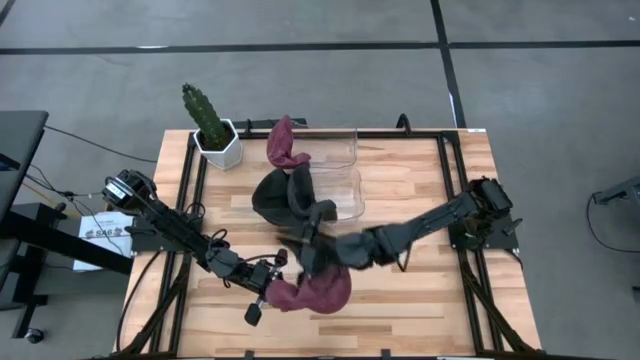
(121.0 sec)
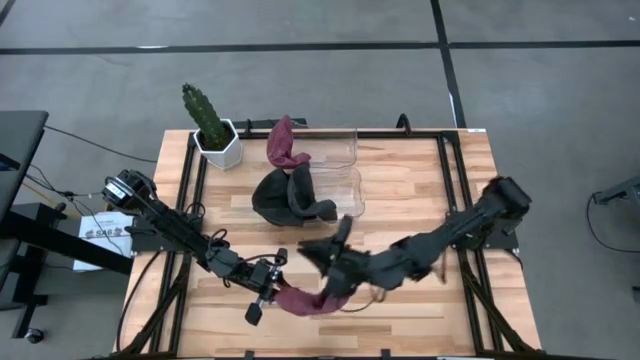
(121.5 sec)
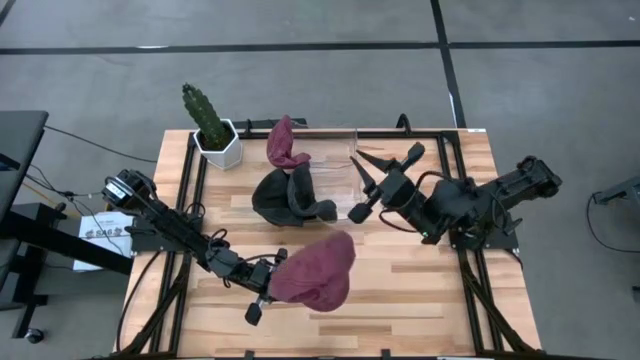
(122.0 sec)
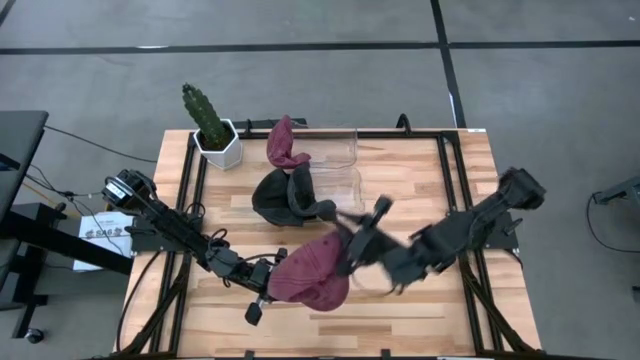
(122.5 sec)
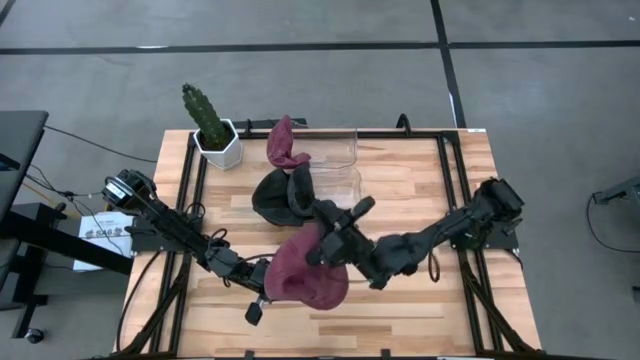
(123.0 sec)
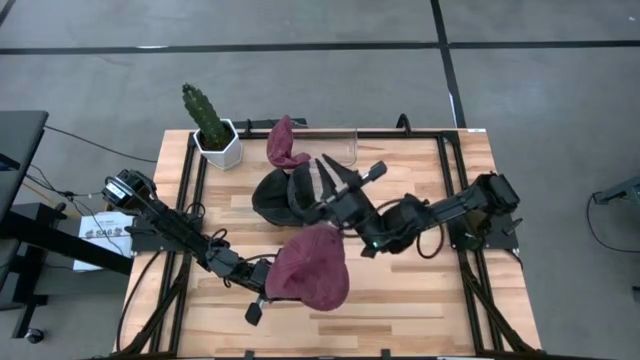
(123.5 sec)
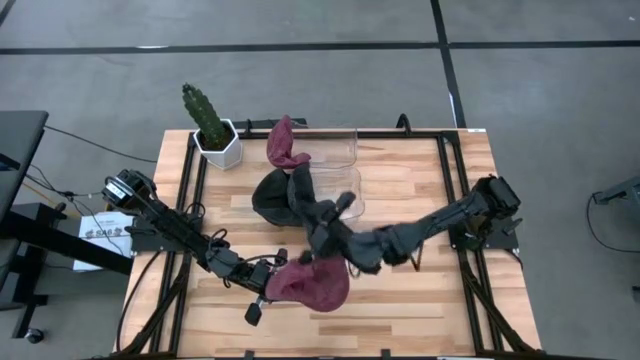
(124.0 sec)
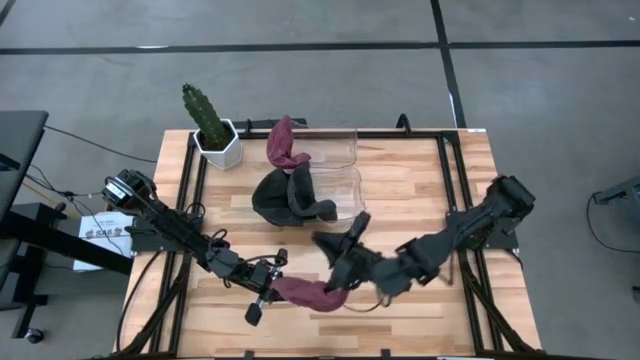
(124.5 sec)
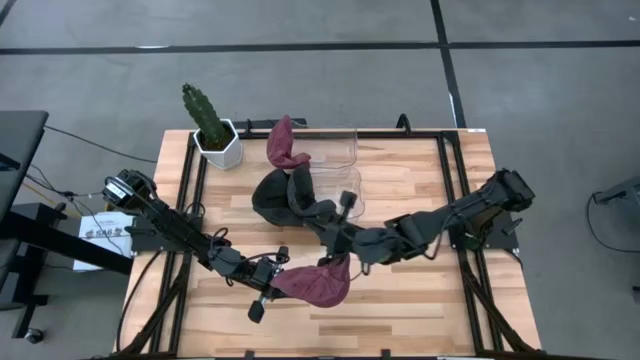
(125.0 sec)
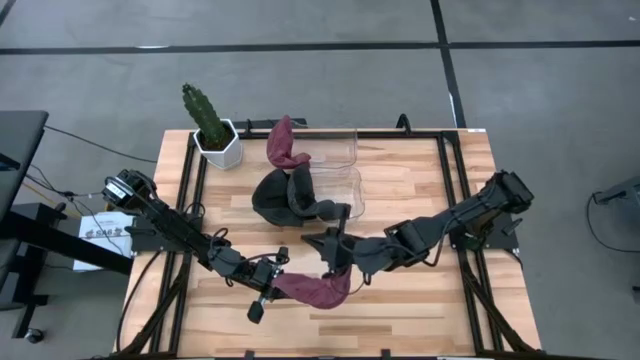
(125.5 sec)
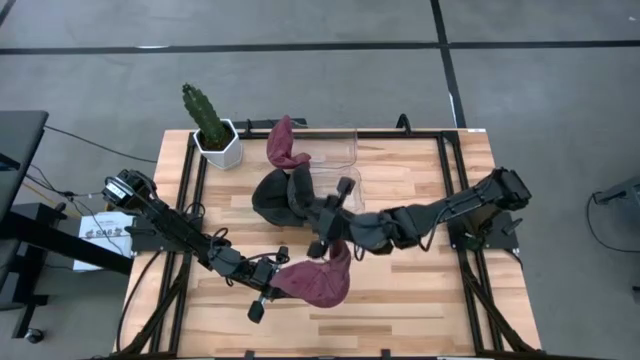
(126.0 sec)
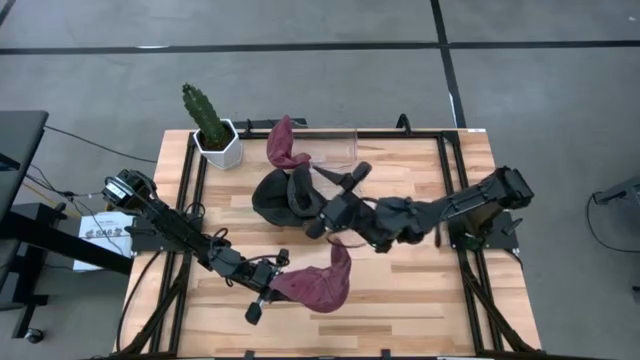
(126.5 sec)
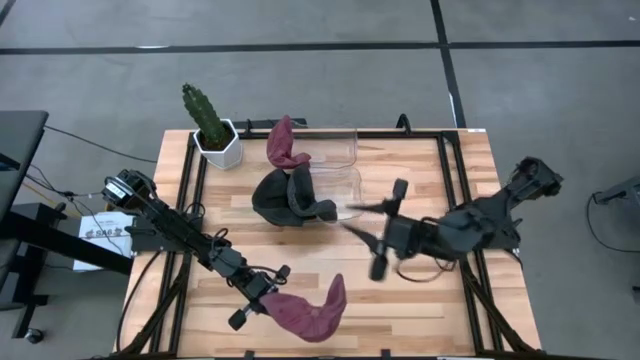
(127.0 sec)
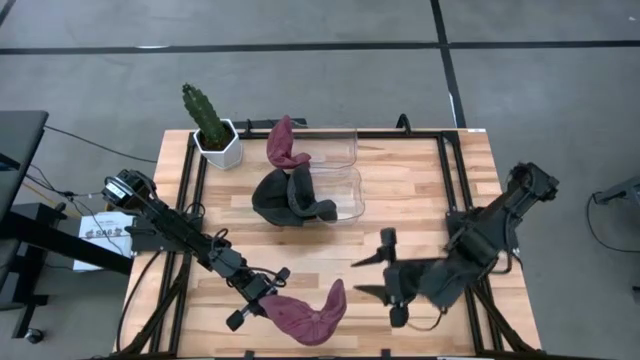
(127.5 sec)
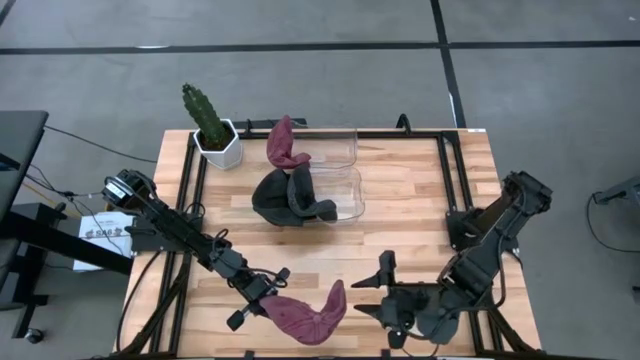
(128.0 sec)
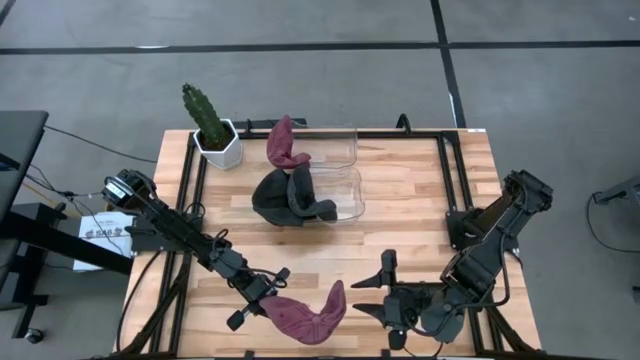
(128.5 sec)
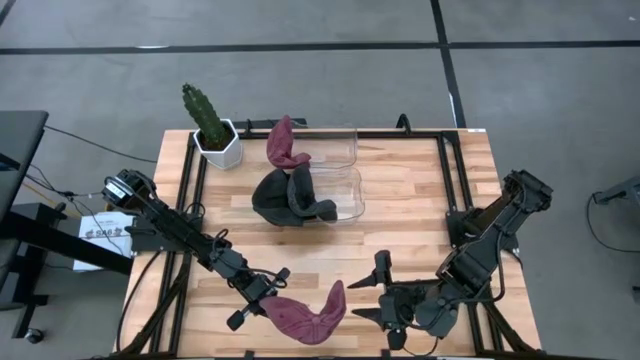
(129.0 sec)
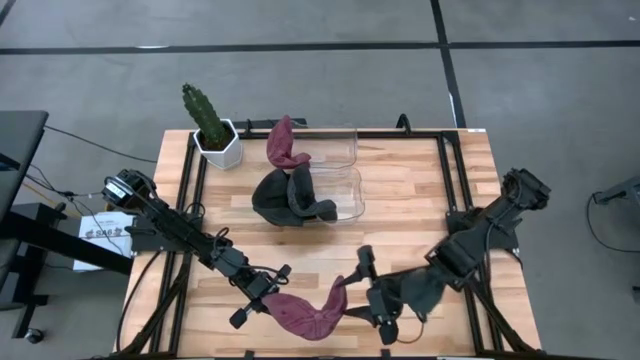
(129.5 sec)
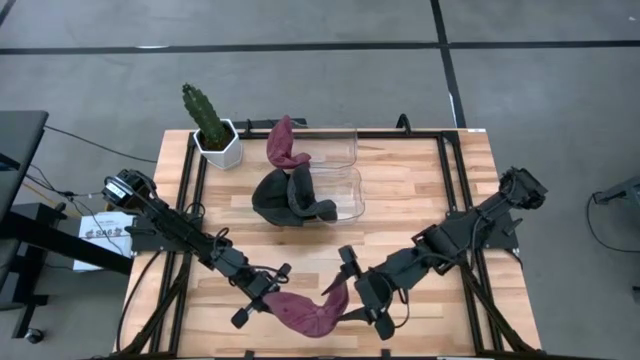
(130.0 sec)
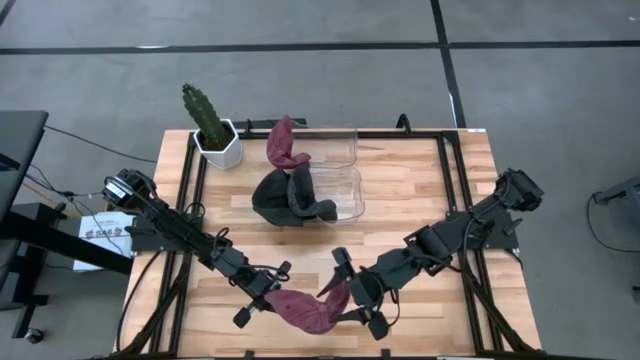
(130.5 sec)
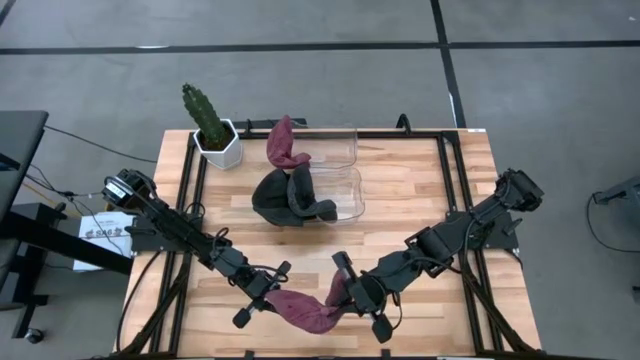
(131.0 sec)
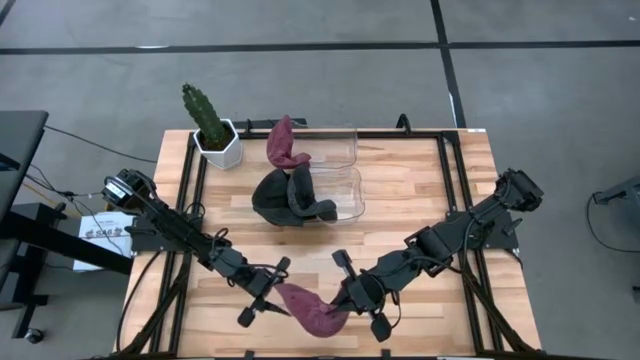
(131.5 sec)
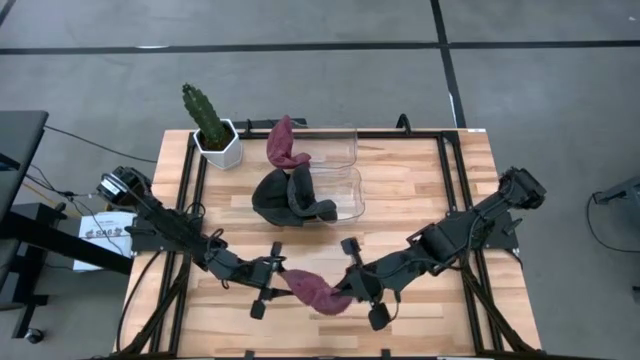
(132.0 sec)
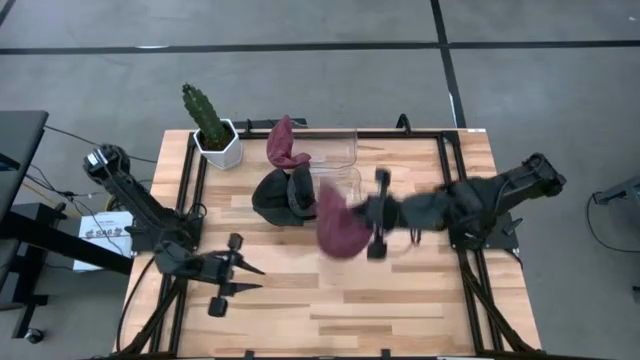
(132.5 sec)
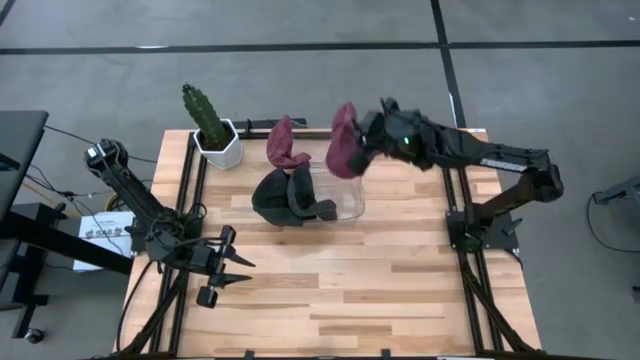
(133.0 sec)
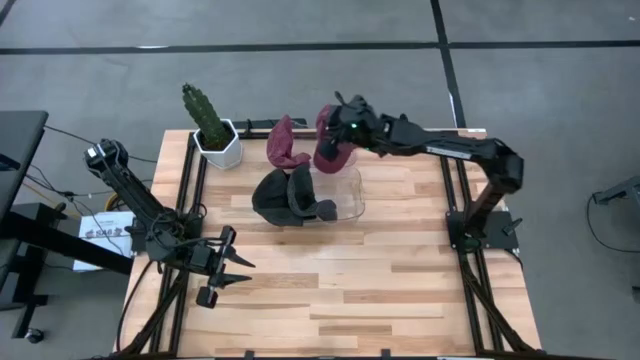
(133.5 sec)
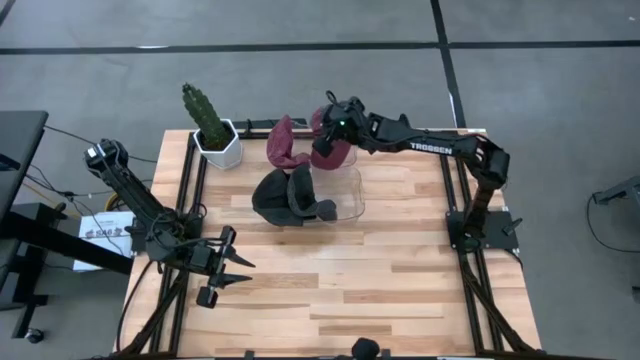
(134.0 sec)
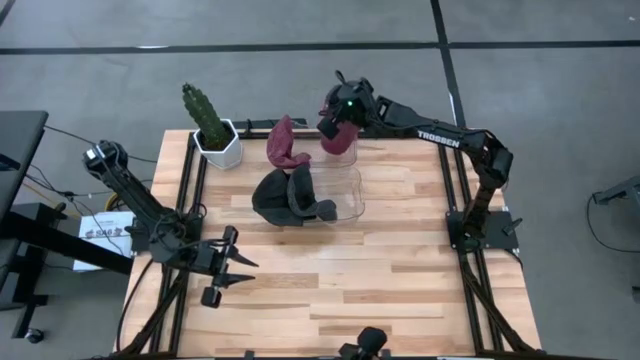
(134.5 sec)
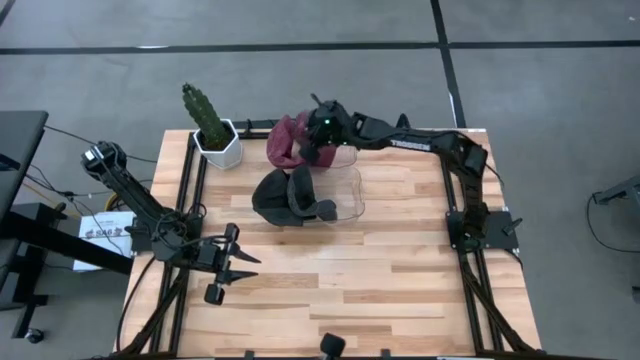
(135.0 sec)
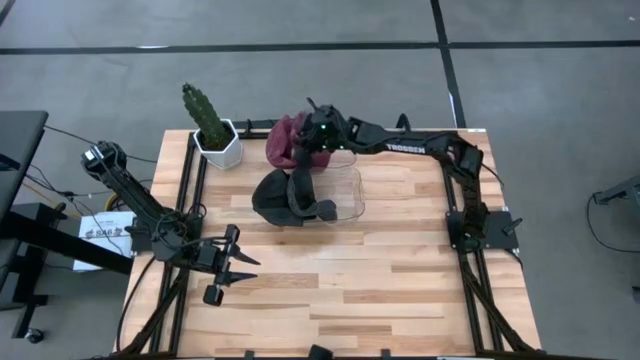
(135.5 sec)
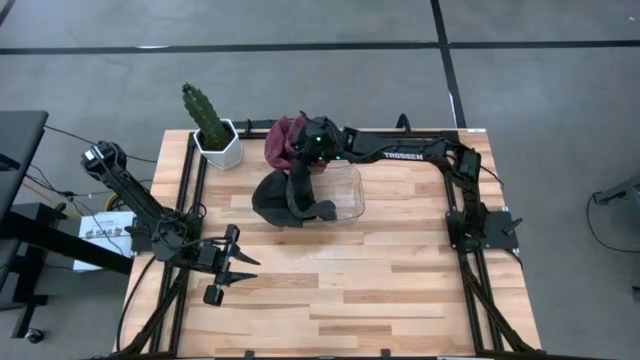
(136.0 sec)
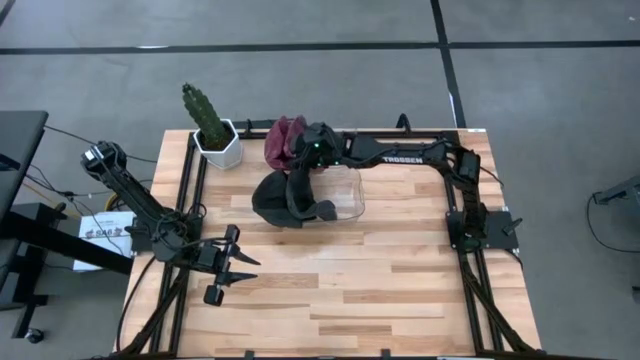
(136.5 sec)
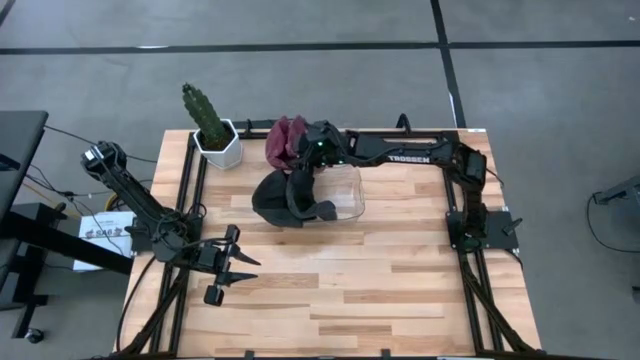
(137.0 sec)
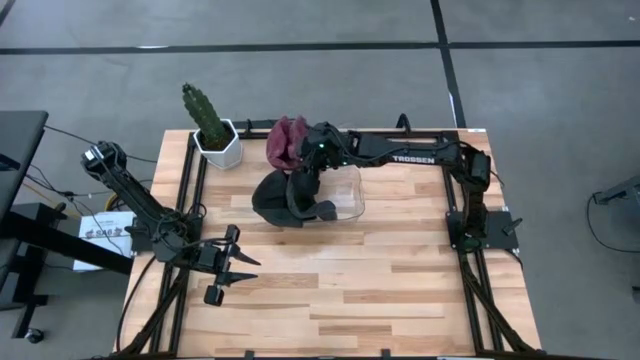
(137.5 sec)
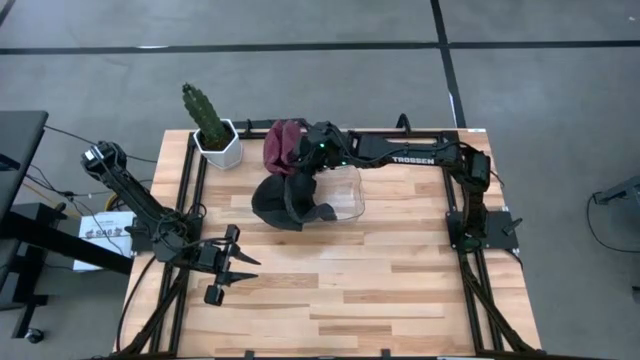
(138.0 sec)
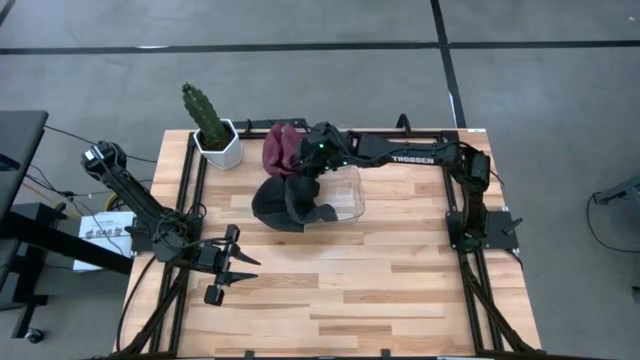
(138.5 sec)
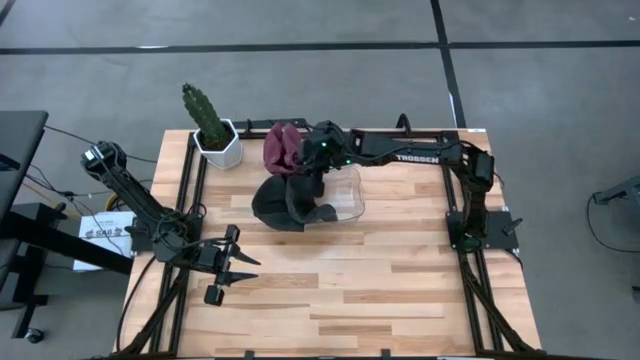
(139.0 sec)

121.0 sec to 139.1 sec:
Task: Pick & Place hat
Put the red cap into the top transparent bin

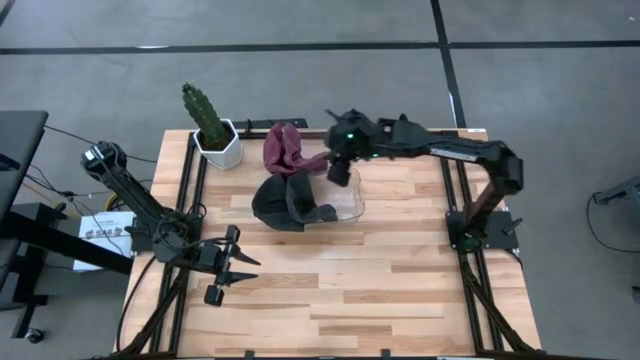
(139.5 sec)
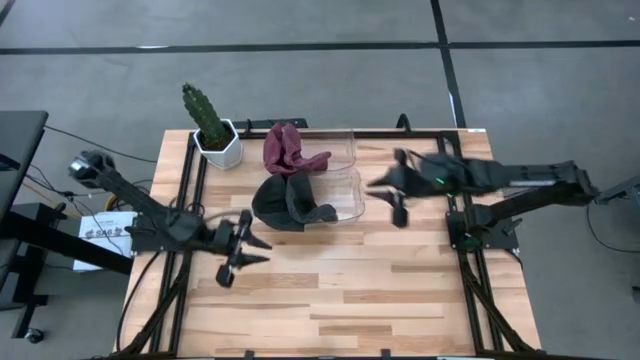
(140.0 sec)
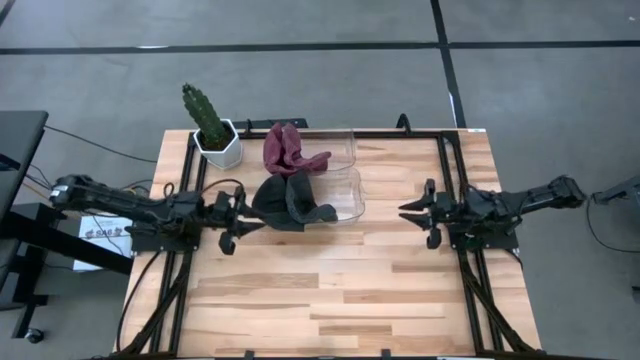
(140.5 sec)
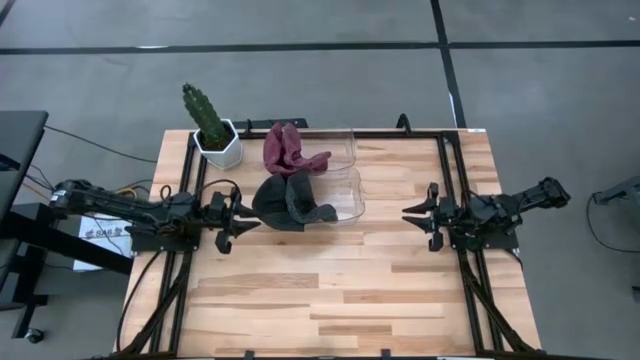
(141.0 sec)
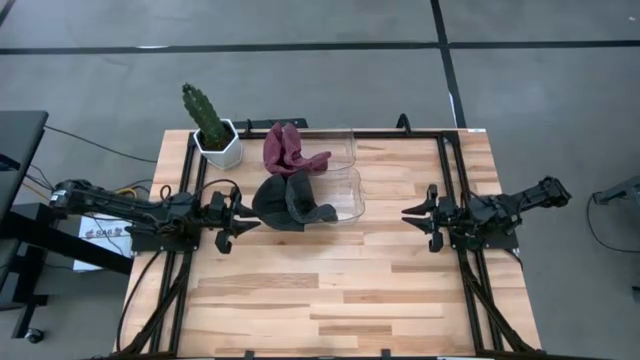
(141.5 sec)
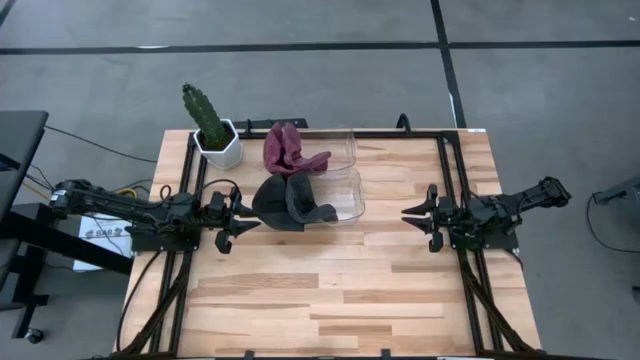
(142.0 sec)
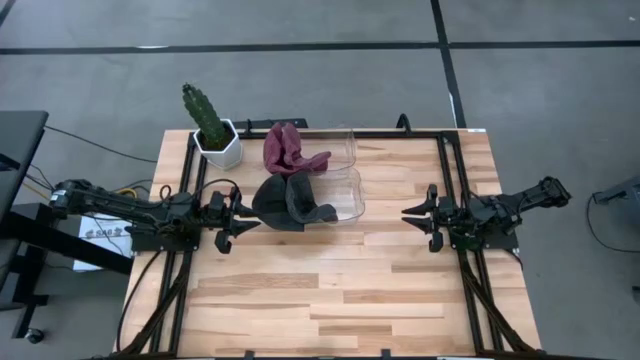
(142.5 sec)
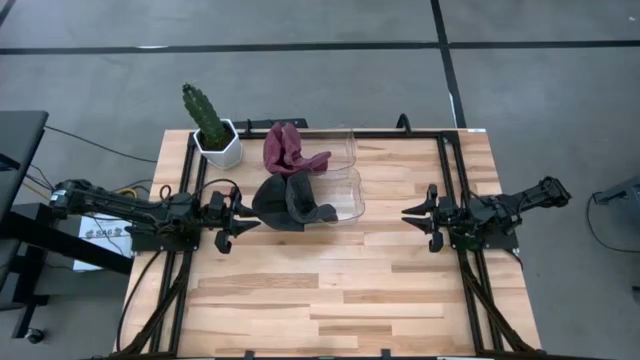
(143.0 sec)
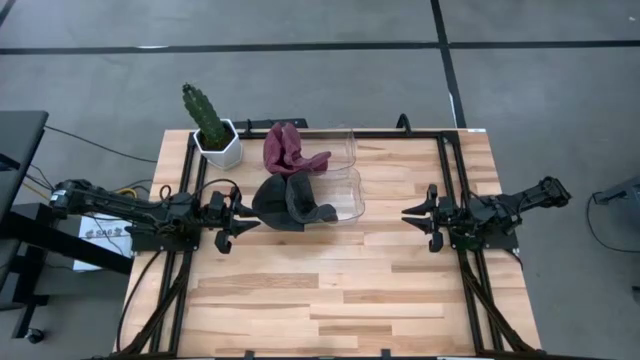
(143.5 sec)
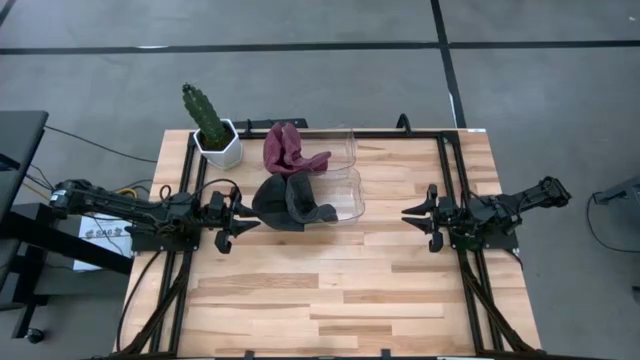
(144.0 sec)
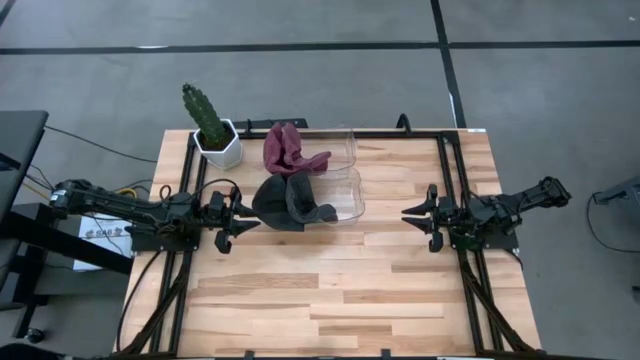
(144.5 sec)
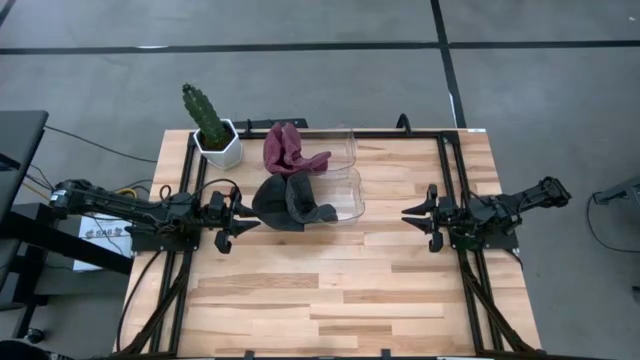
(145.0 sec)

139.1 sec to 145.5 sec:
Return to home position
